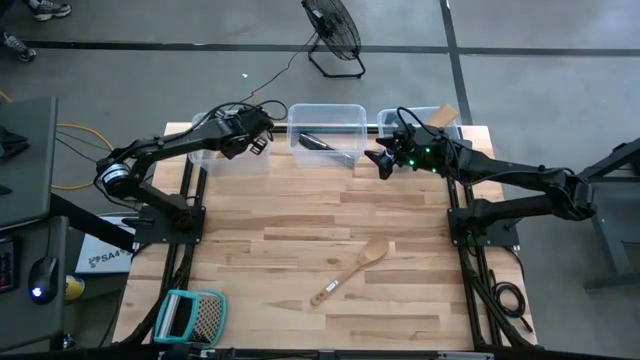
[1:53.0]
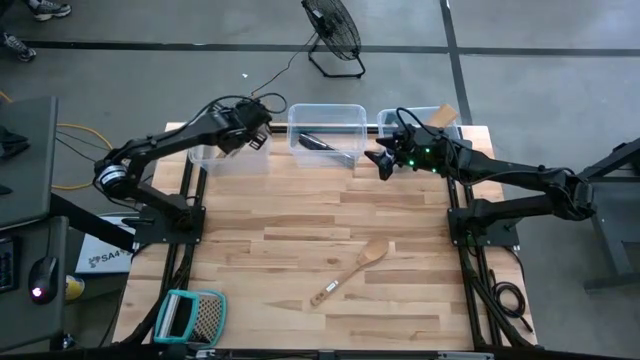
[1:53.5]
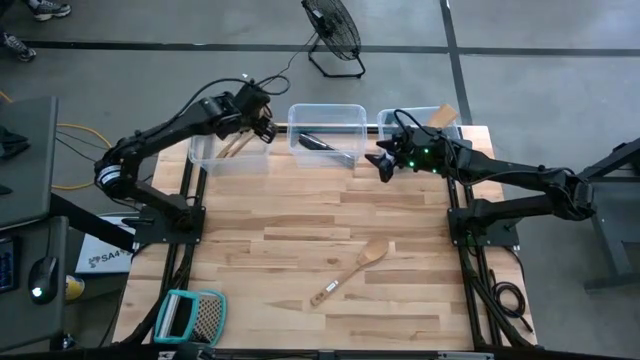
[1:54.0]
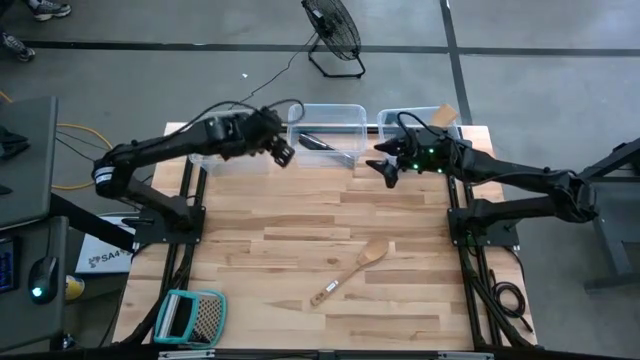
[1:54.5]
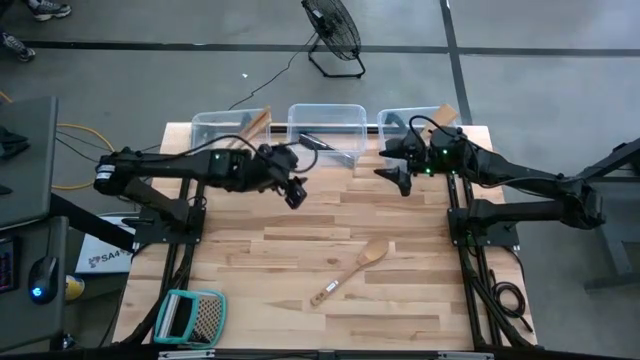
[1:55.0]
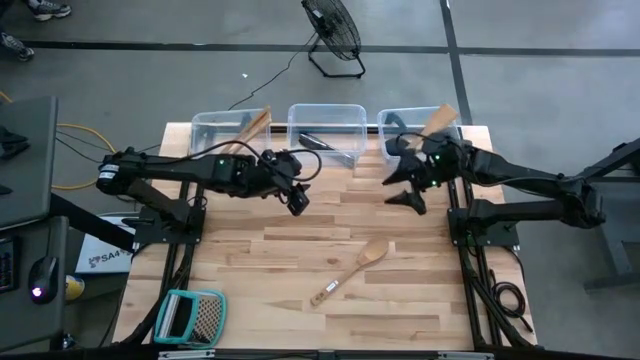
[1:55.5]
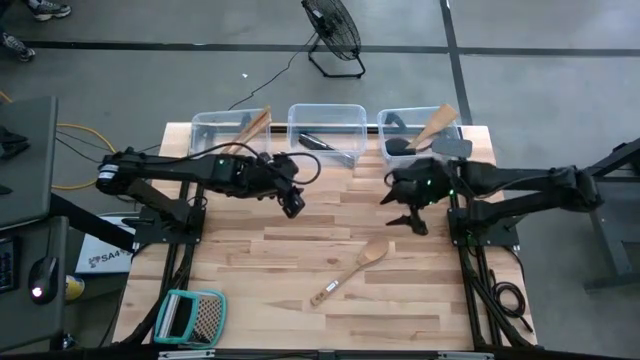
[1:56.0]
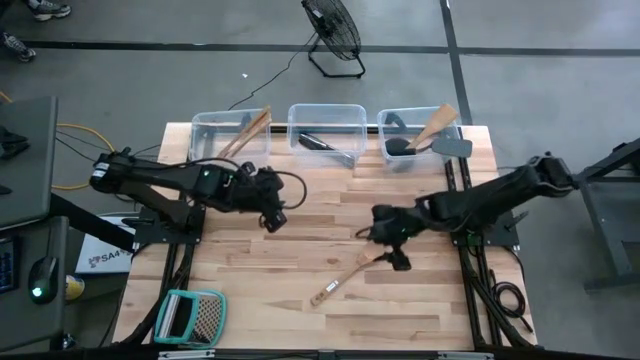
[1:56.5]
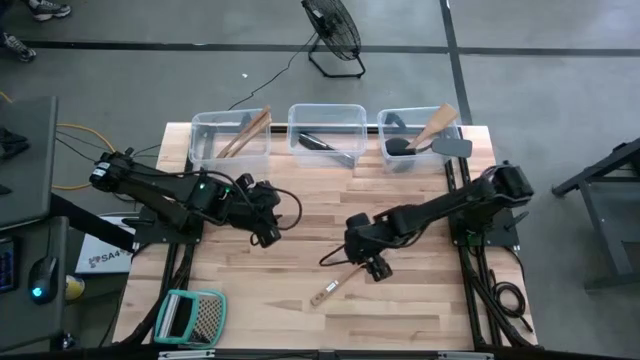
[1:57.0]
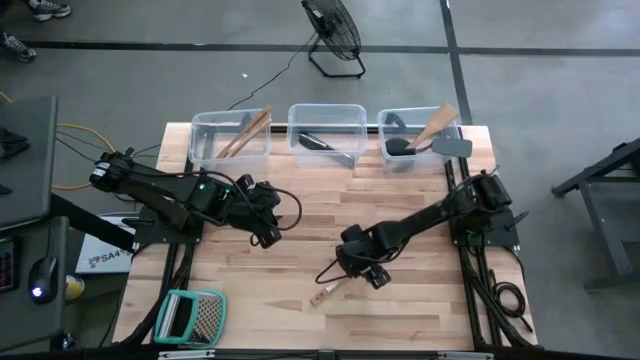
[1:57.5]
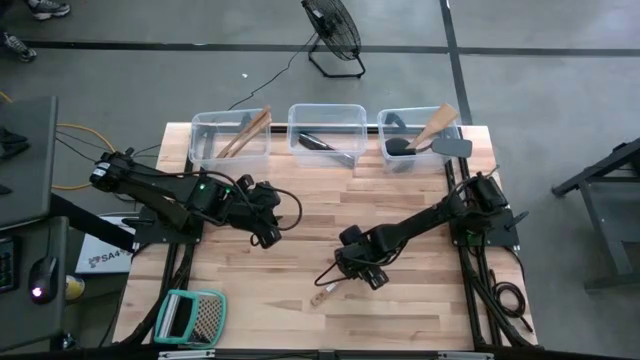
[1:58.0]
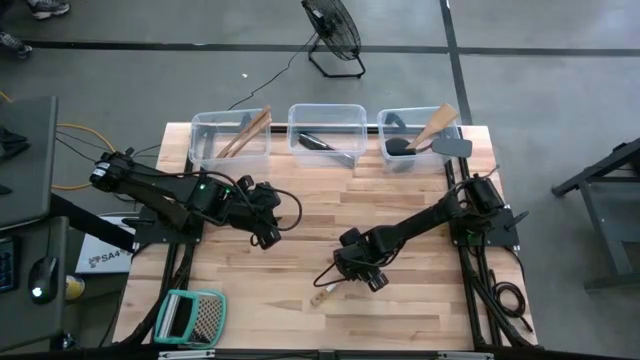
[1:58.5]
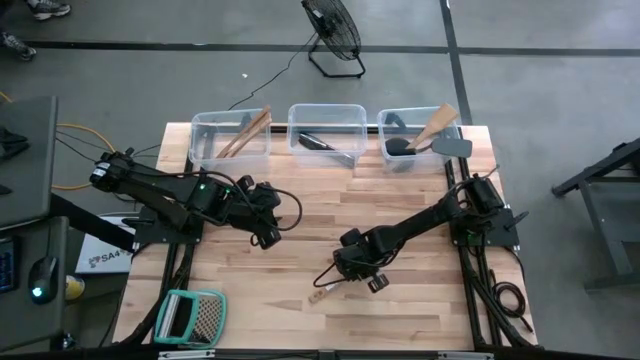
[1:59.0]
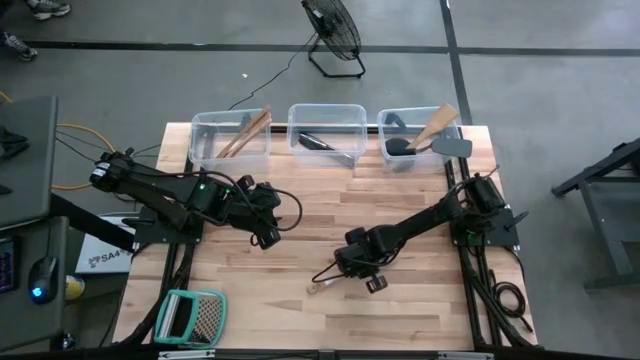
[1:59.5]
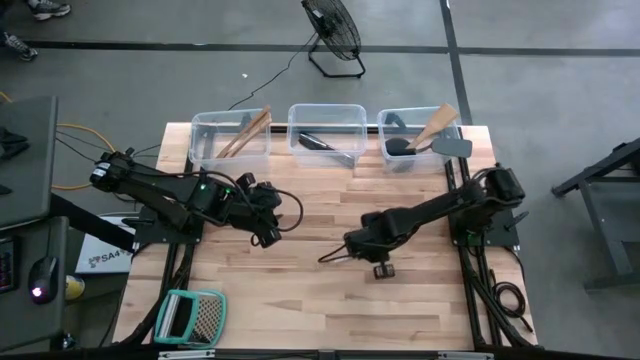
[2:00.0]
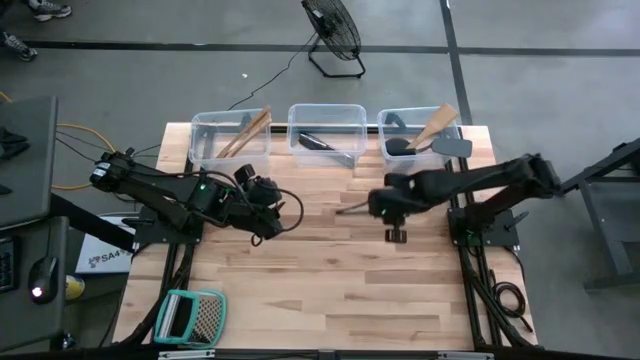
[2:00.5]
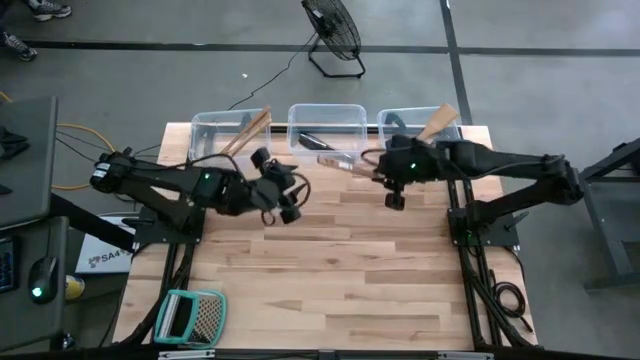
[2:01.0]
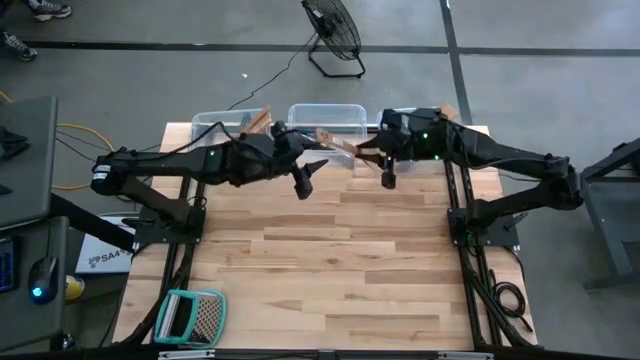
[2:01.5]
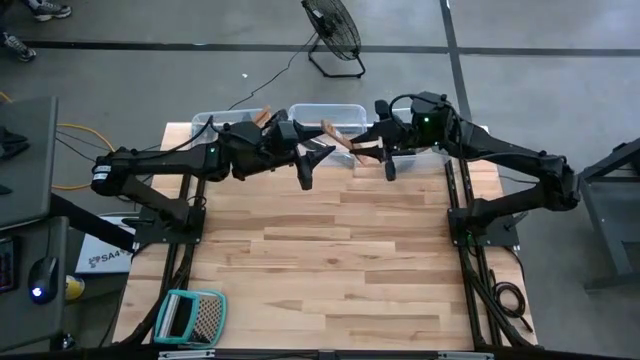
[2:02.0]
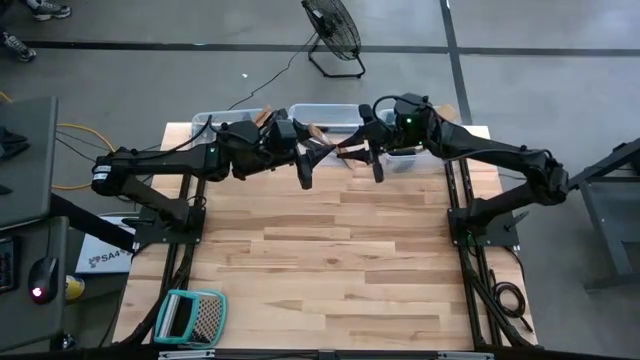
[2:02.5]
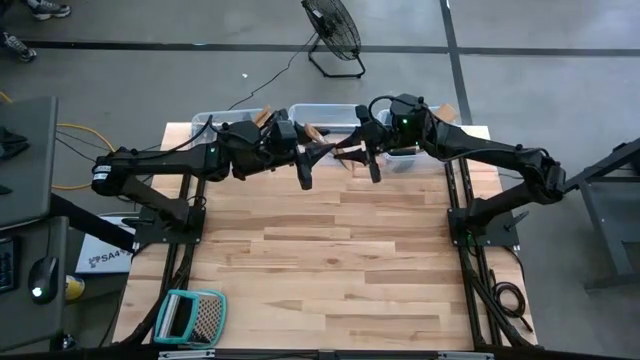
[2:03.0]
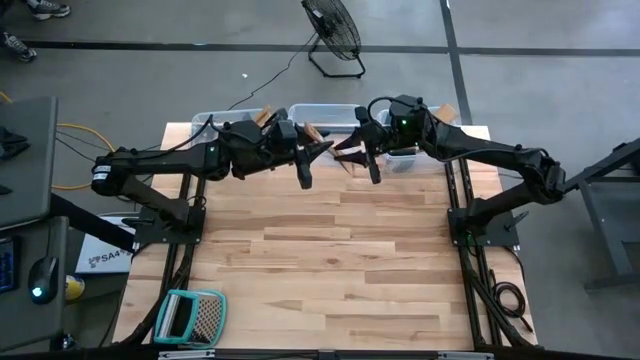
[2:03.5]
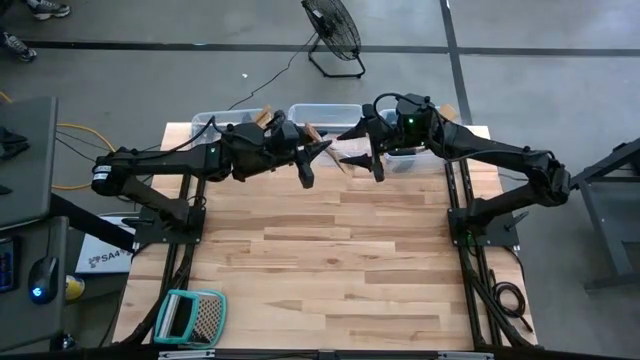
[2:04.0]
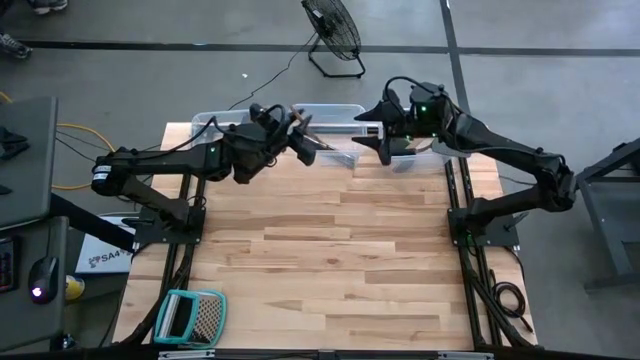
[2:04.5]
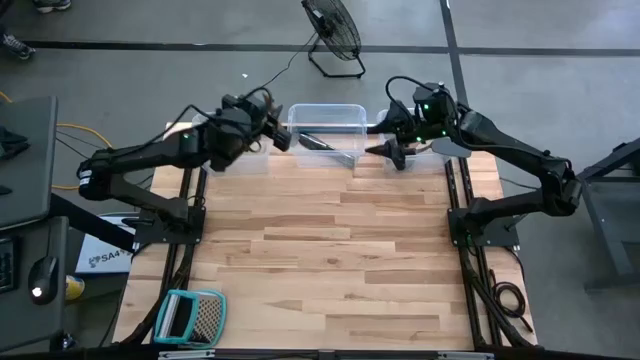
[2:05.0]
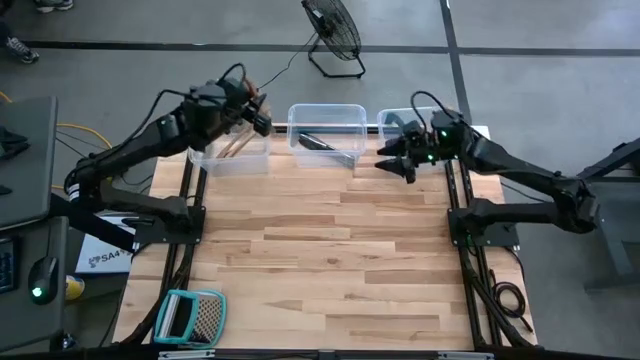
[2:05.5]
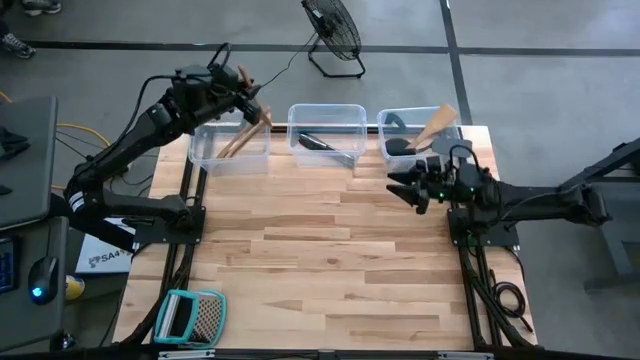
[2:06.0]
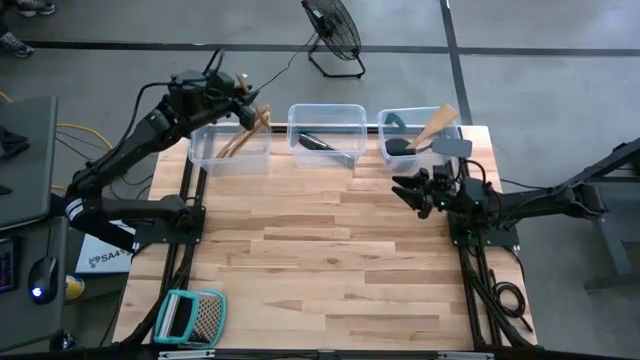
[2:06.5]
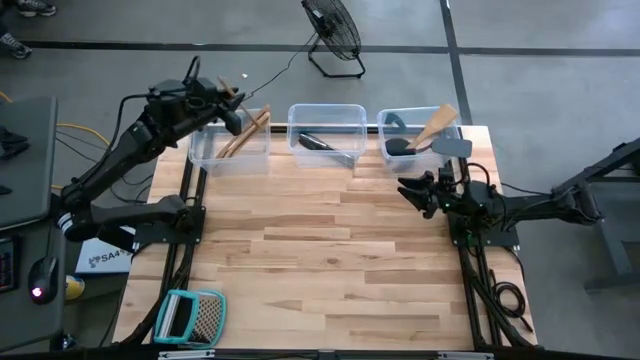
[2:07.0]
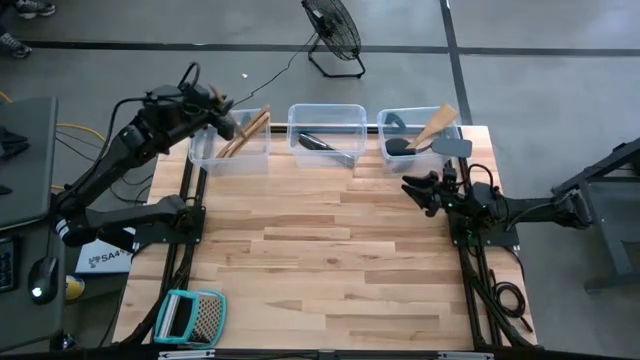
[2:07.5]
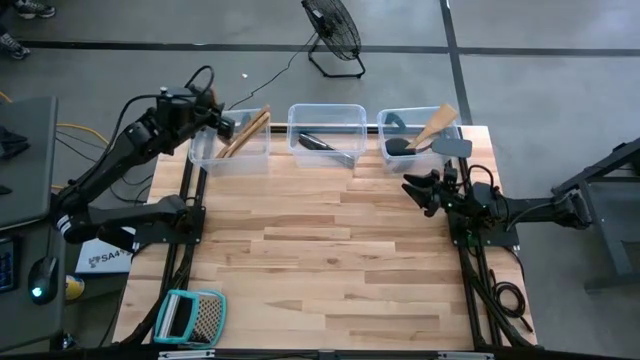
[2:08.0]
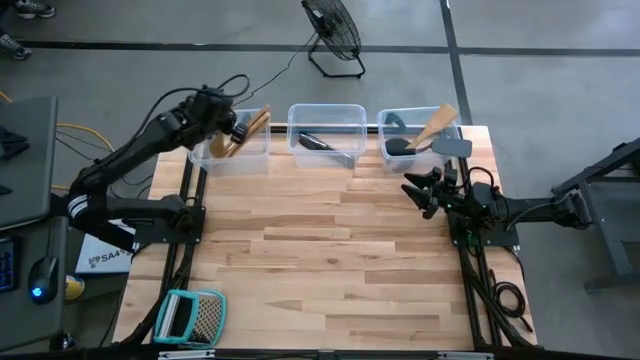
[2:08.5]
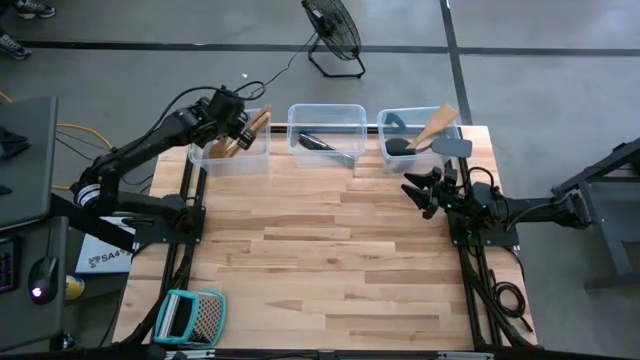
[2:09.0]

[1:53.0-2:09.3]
Task: Pick & Place Kitchen Items
Put the brown wooden spoon into the left transparent bin

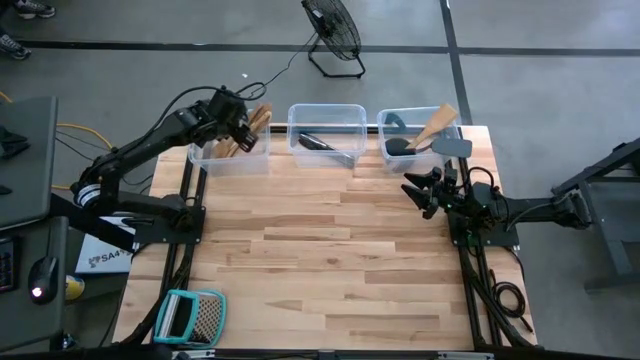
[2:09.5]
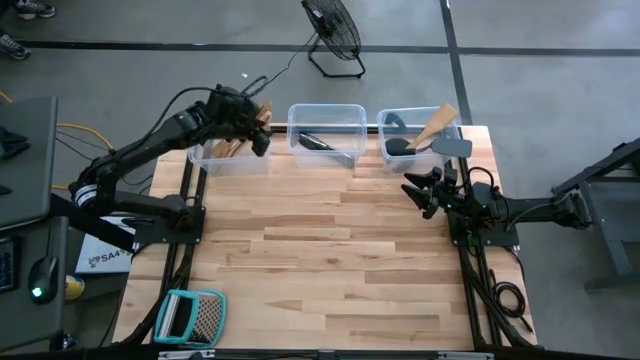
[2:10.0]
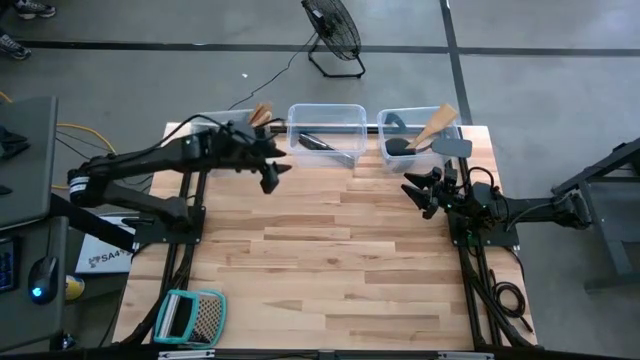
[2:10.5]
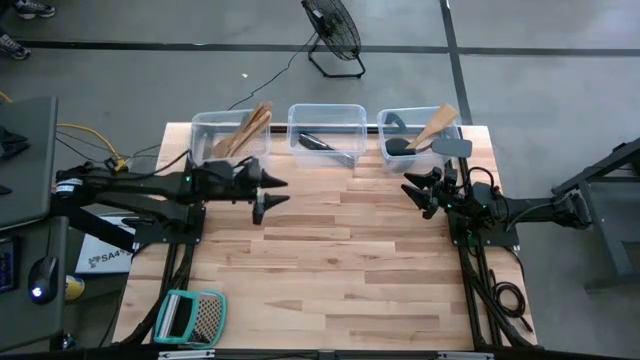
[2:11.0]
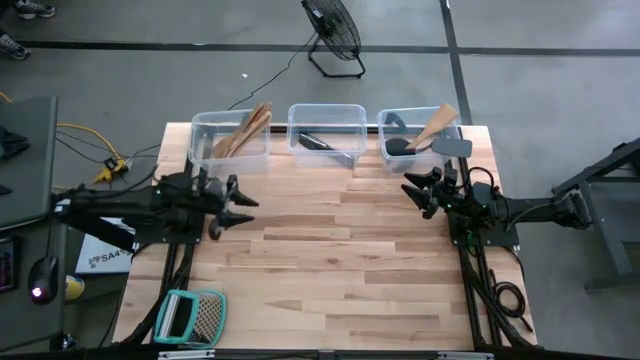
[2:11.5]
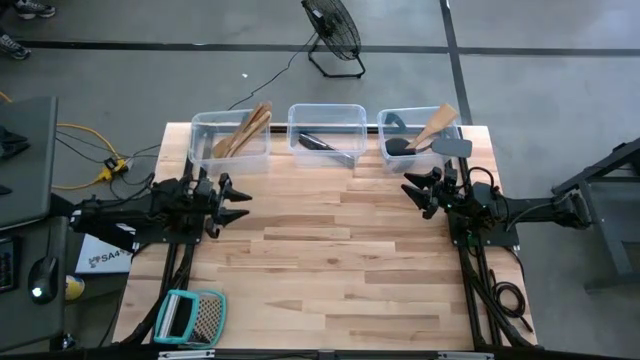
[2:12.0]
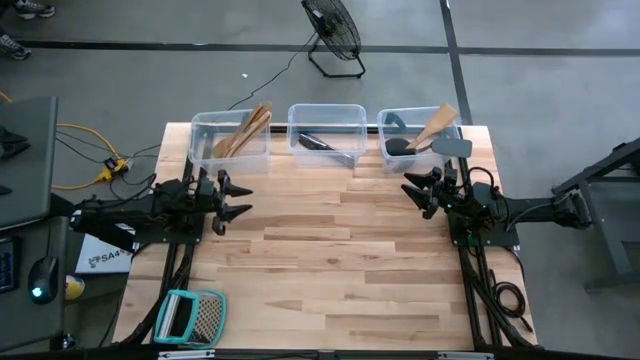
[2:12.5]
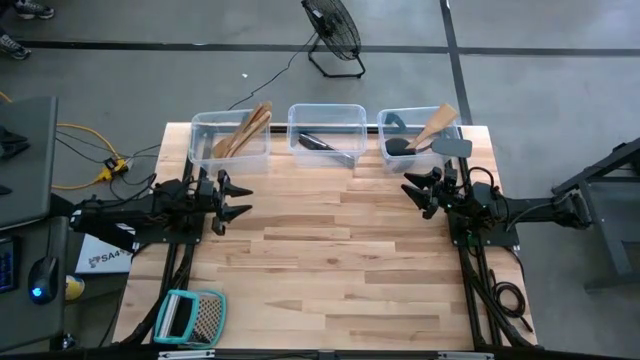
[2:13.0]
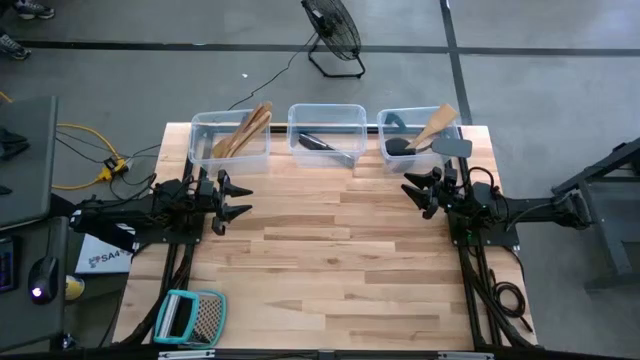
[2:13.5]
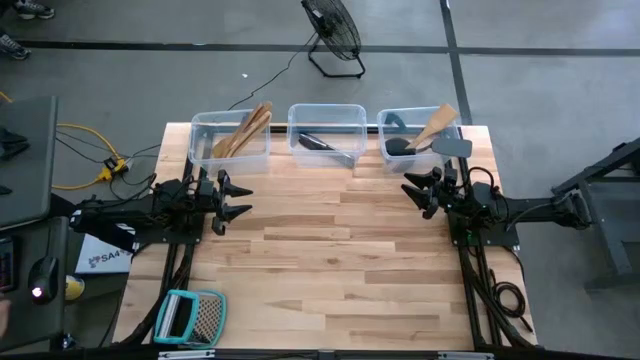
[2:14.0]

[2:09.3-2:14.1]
Return to Home Position
